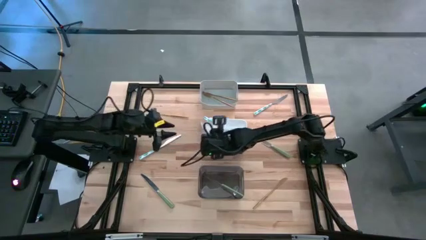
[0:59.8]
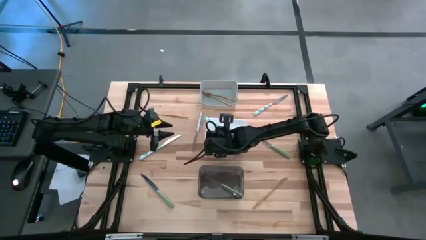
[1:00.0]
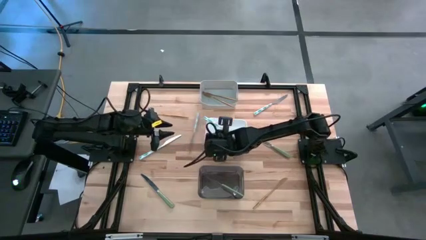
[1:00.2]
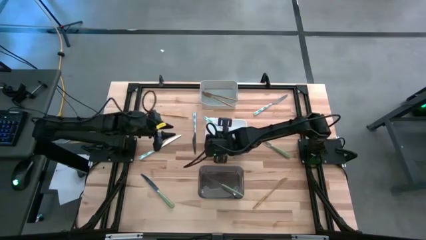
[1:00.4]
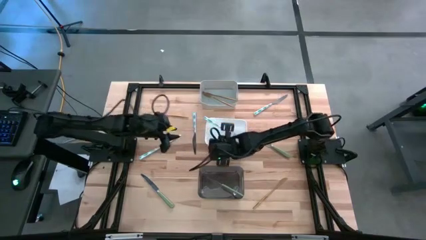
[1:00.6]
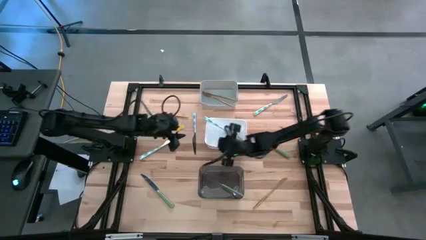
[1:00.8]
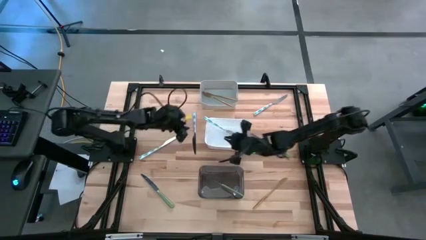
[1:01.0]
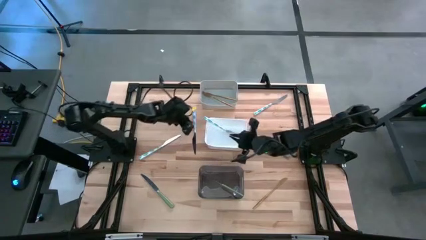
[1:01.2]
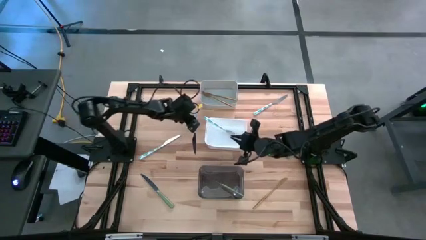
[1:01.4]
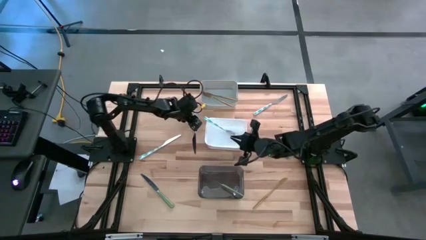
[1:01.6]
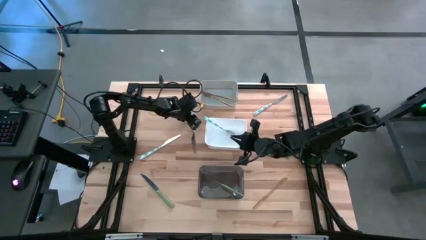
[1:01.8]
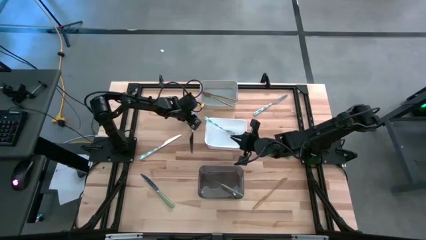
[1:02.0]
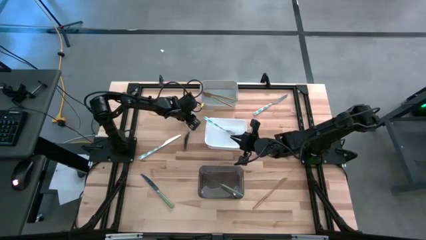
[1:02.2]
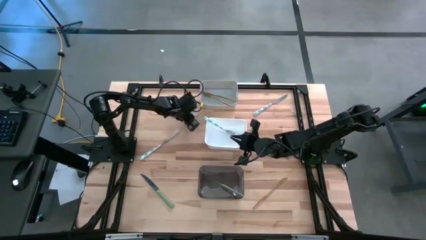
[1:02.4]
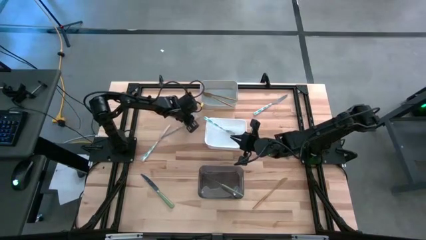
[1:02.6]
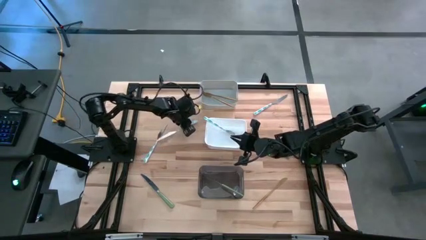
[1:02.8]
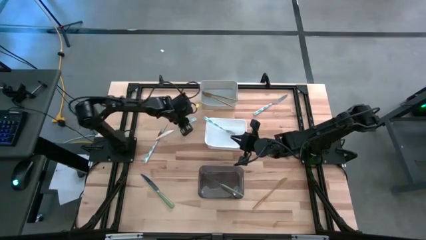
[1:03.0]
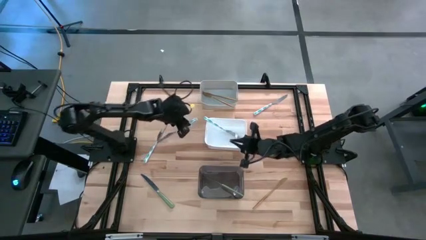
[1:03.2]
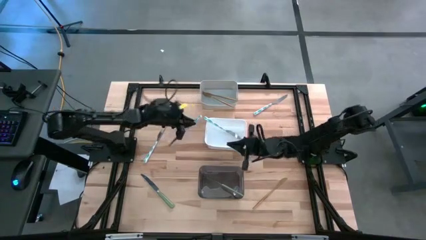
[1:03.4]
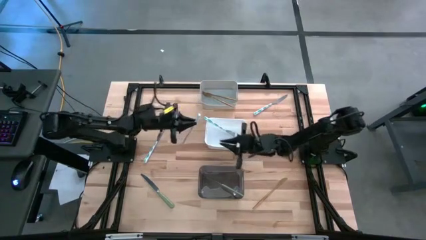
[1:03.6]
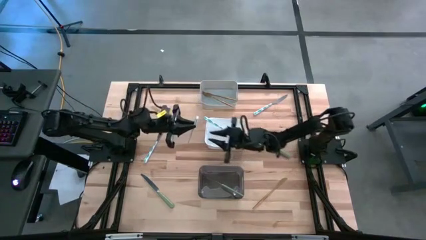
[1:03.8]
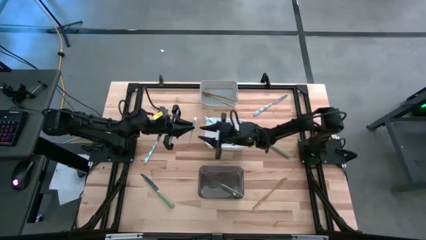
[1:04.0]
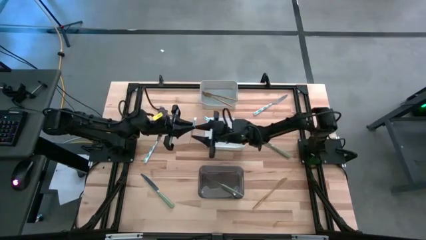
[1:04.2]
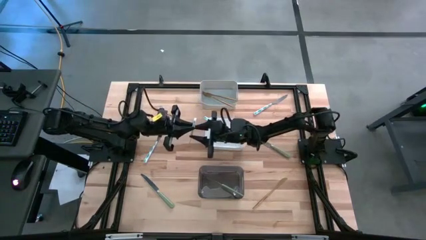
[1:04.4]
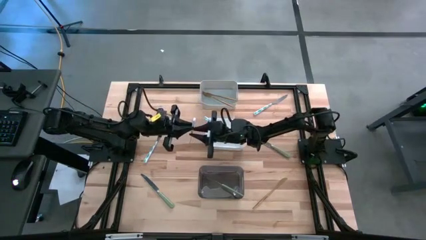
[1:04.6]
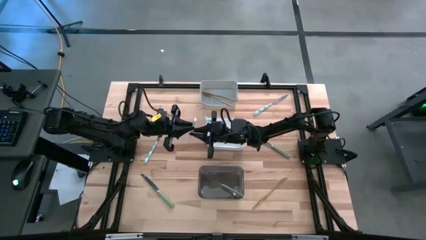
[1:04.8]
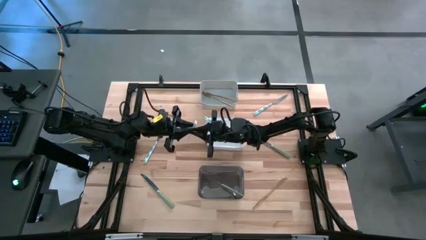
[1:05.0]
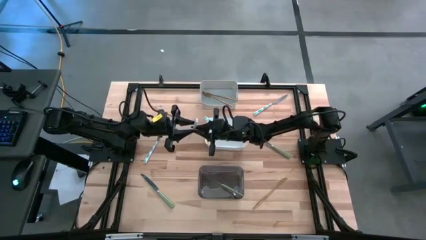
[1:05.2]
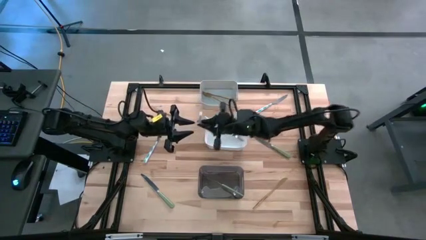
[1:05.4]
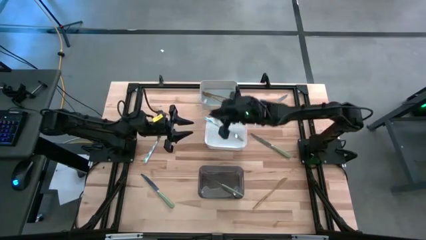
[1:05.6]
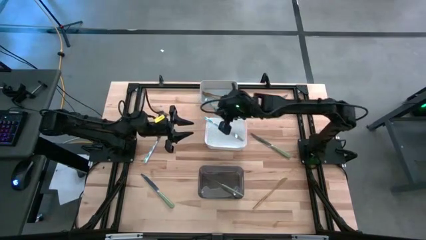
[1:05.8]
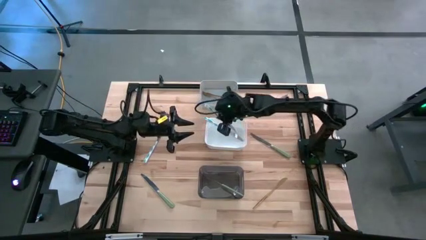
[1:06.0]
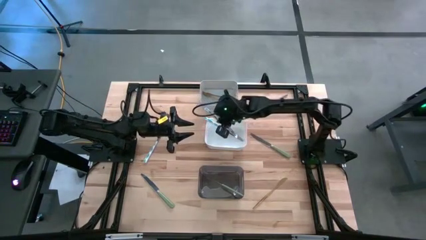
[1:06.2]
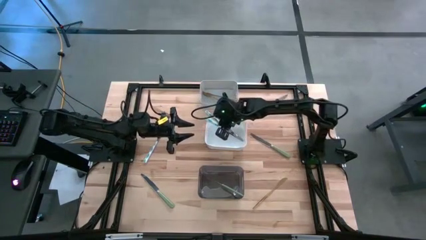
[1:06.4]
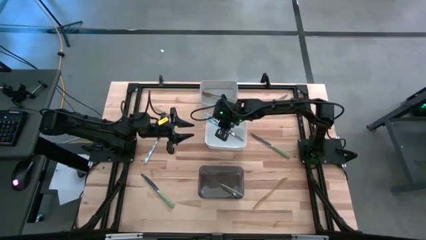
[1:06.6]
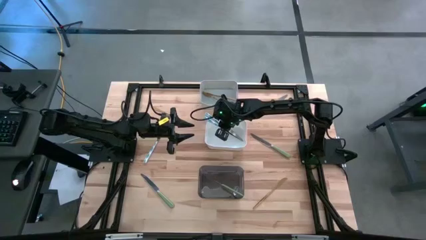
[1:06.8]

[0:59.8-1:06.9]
Task: Sort silverware by color (type)
Put the white-blue table knife into the white bin

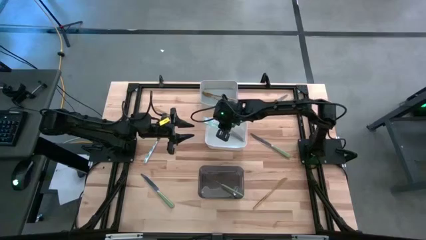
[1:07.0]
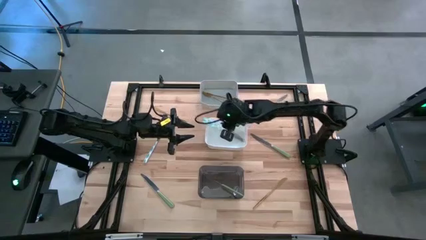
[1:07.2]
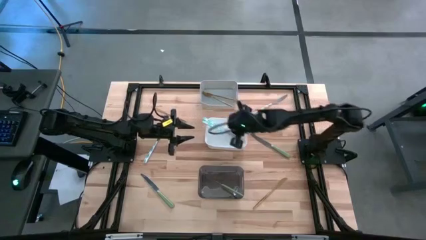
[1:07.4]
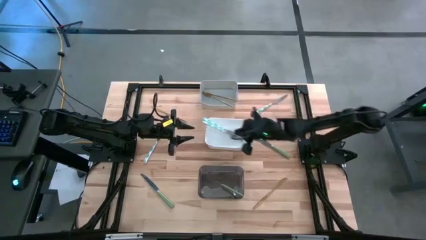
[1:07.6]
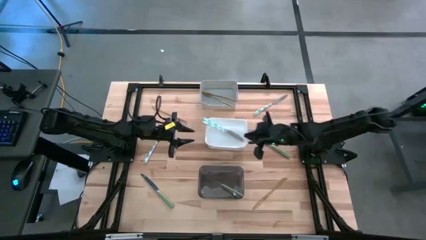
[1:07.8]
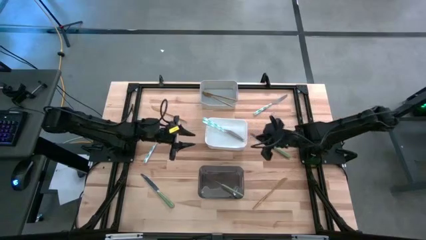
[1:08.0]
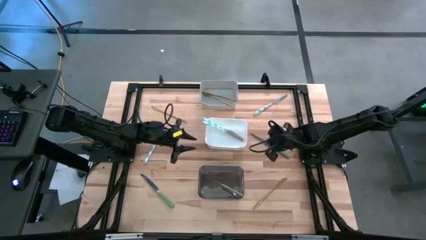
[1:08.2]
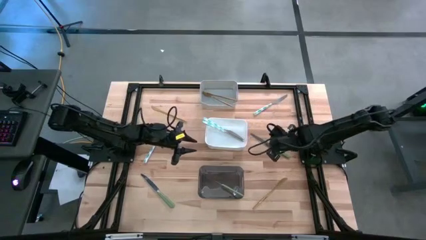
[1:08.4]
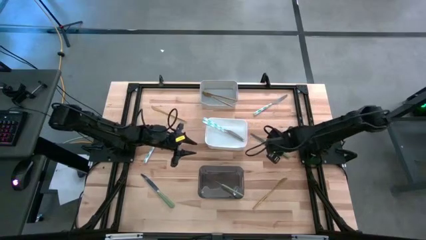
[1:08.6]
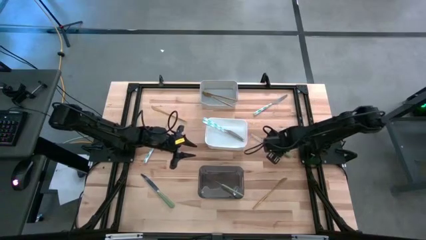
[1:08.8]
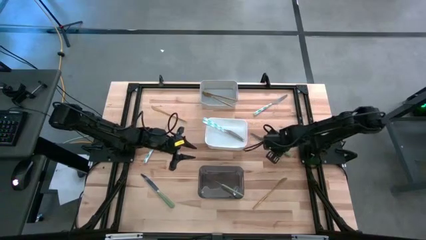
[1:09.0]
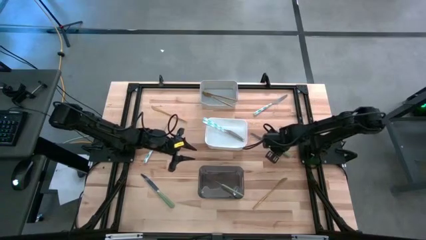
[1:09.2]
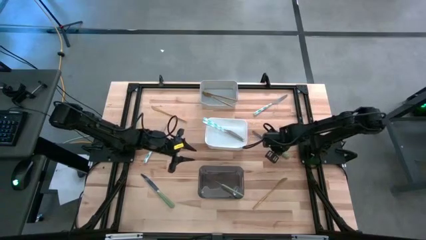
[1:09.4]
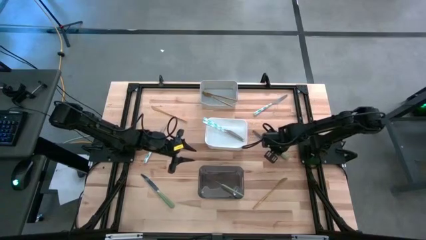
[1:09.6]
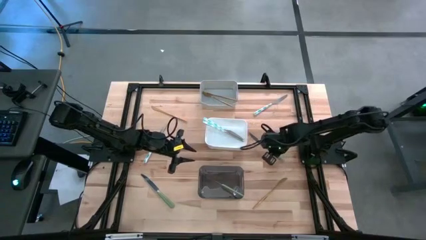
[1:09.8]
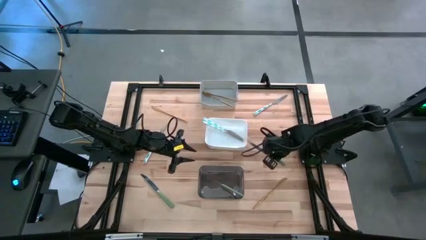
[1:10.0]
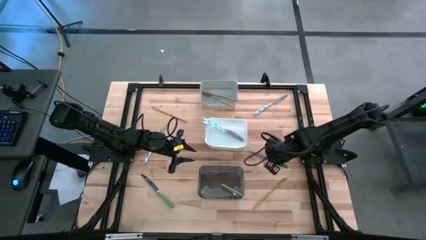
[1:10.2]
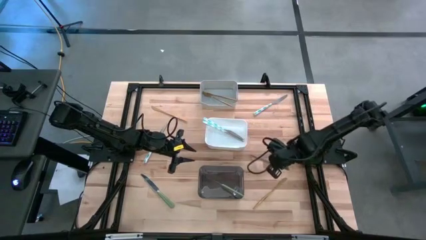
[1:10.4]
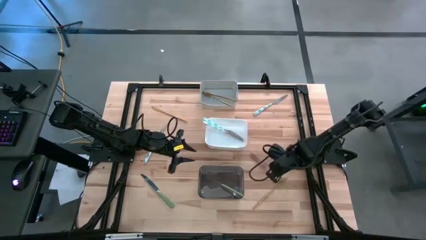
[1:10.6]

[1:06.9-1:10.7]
Put the light green table knife into the black bin

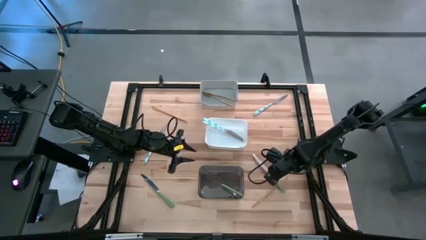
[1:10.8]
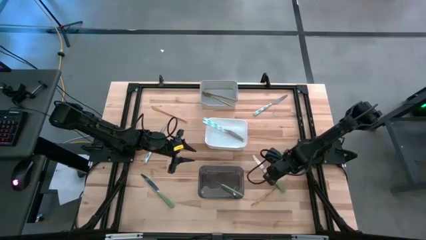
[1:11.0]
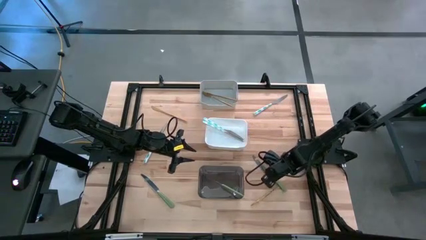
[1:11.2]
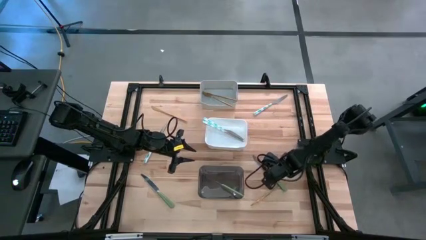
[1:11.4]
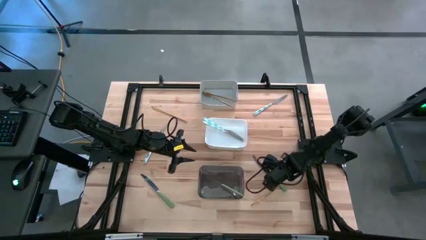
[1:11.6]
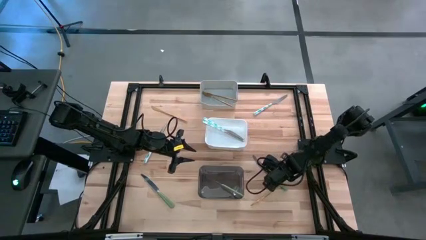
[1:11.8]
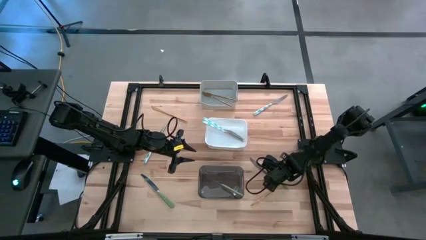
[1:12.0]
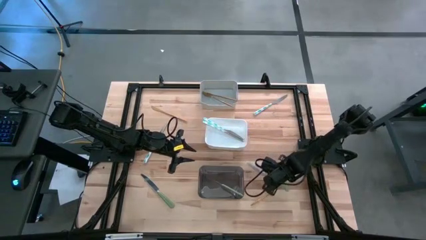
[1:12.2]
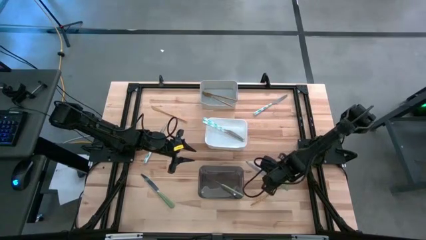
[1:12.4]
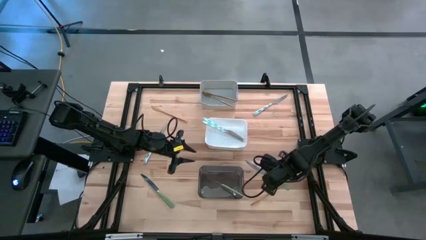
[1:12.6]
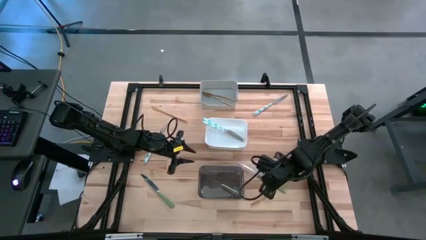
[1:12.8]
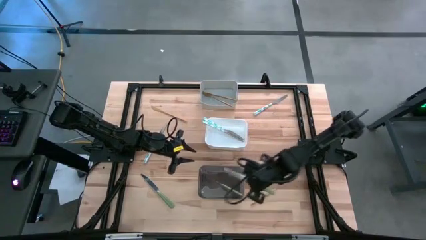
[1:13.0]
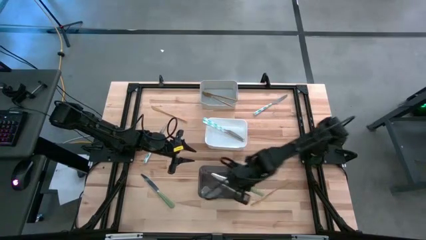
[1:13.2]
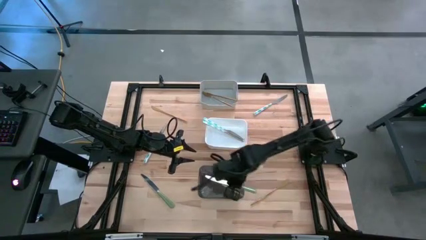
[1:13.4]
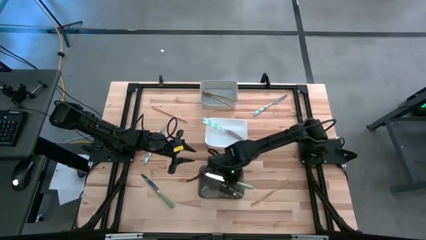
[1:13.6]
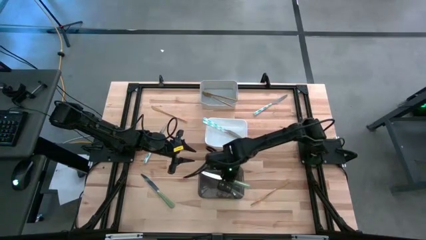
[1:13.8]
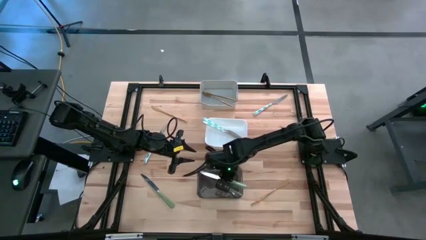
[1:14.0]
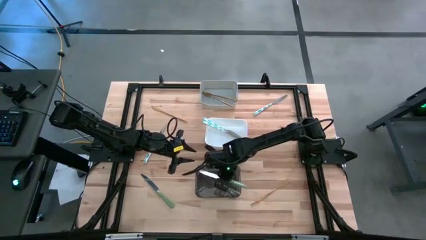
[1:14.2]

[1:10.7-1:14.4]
Put the light green table knife into the black bin
